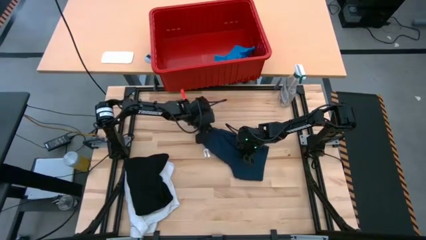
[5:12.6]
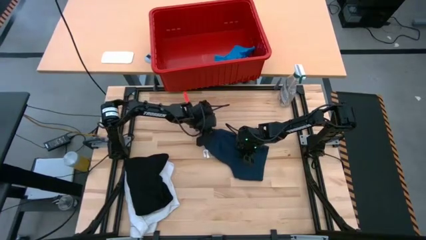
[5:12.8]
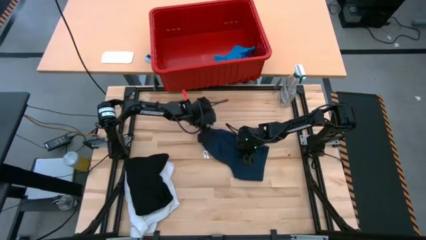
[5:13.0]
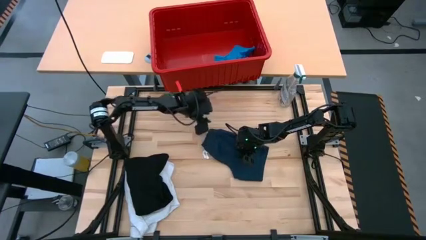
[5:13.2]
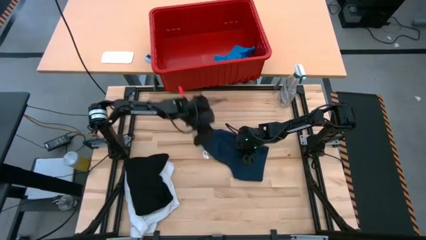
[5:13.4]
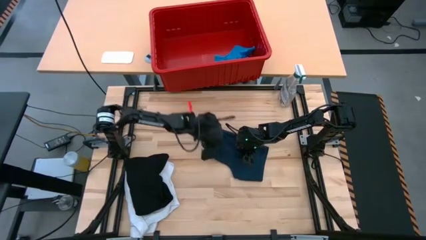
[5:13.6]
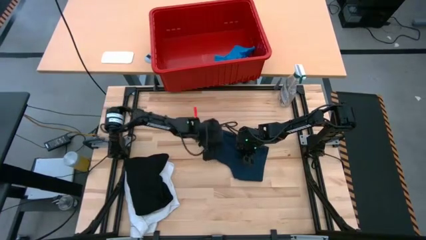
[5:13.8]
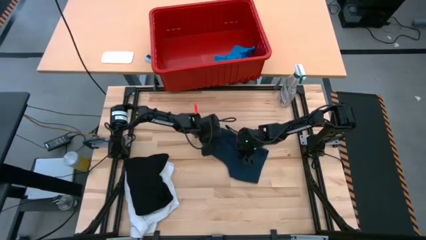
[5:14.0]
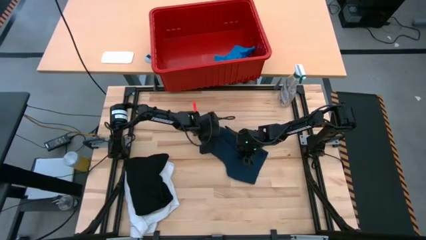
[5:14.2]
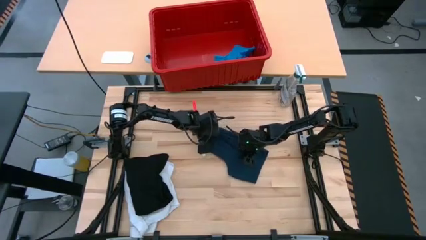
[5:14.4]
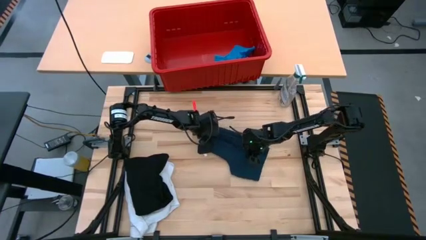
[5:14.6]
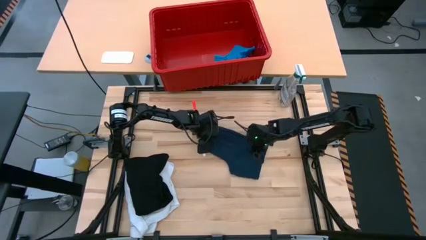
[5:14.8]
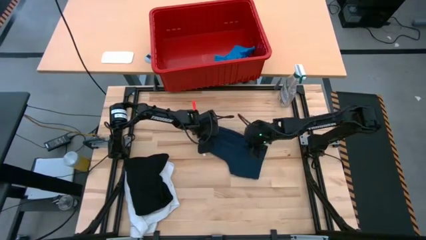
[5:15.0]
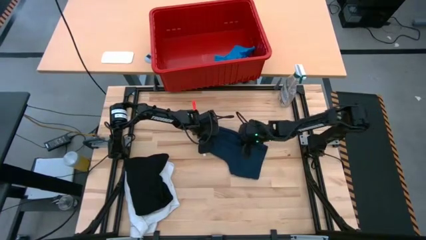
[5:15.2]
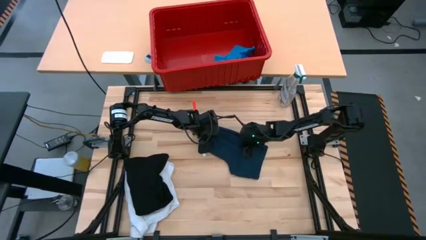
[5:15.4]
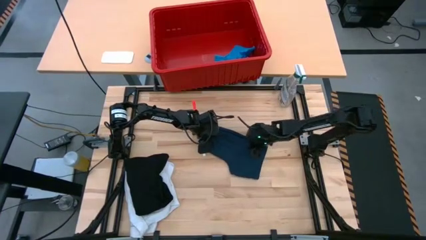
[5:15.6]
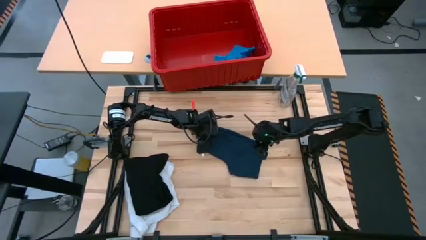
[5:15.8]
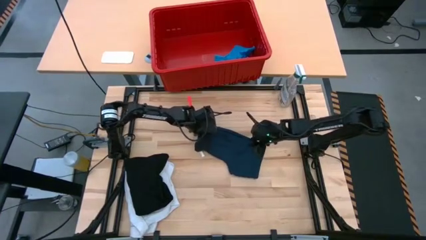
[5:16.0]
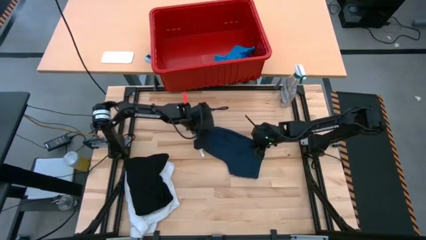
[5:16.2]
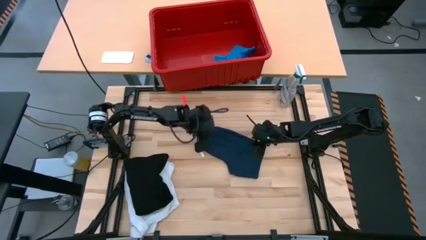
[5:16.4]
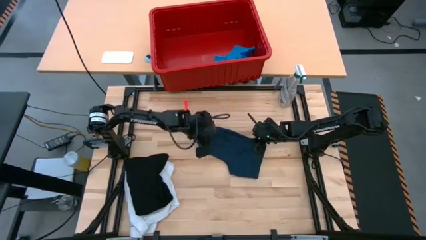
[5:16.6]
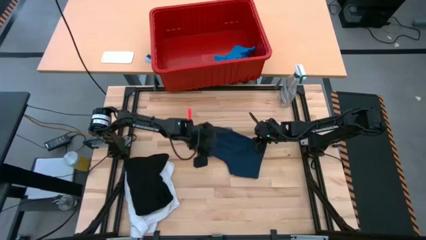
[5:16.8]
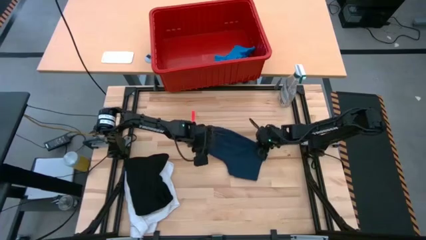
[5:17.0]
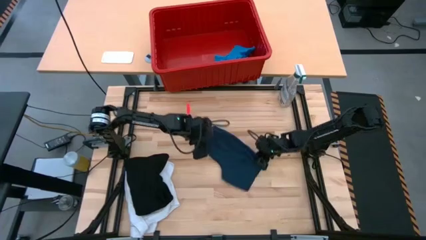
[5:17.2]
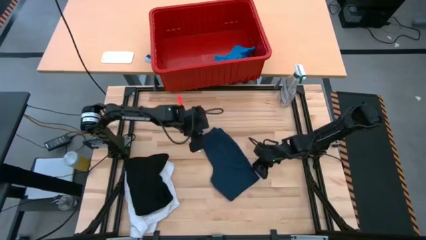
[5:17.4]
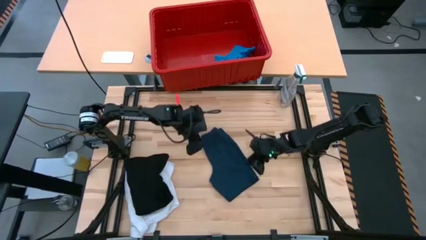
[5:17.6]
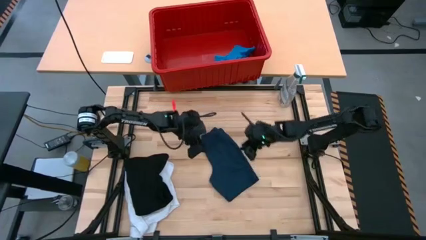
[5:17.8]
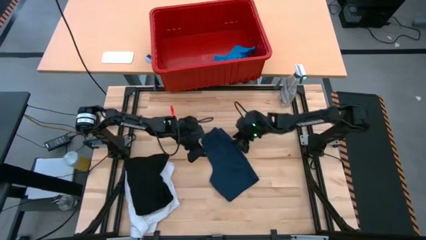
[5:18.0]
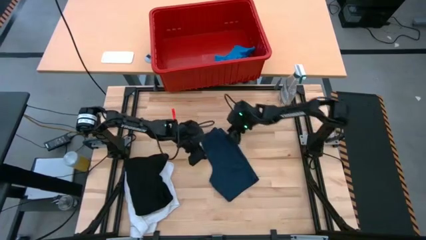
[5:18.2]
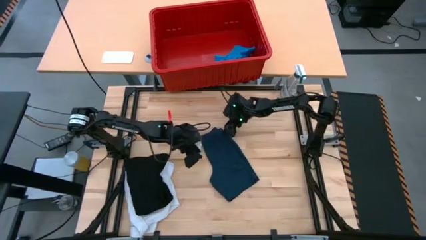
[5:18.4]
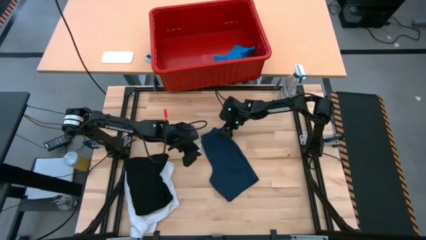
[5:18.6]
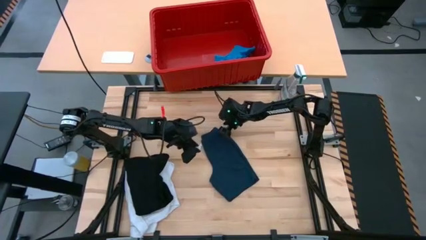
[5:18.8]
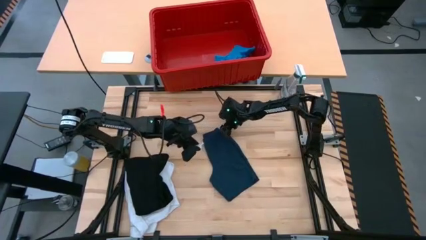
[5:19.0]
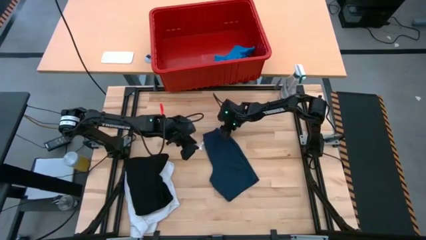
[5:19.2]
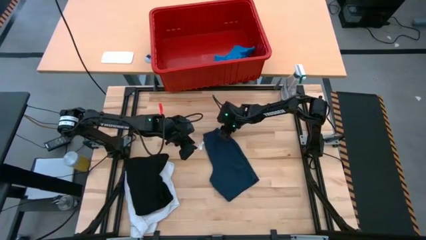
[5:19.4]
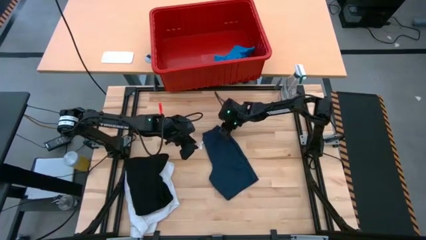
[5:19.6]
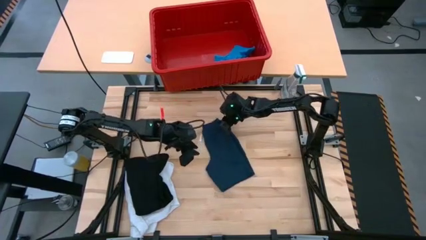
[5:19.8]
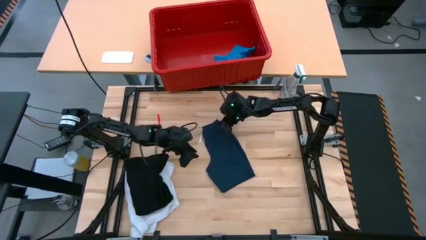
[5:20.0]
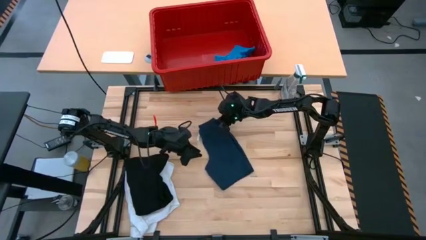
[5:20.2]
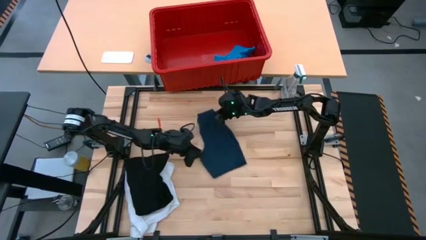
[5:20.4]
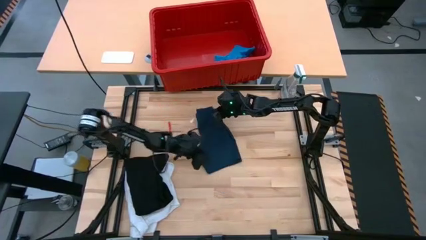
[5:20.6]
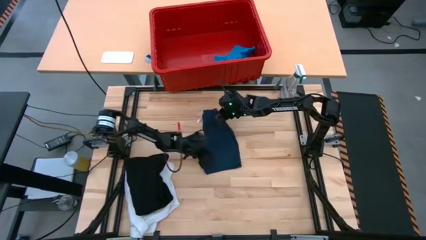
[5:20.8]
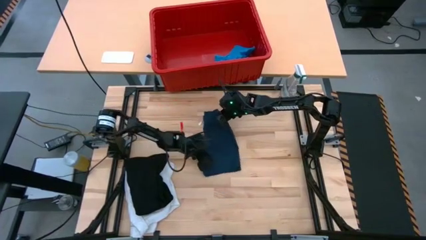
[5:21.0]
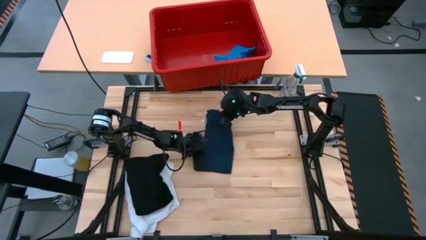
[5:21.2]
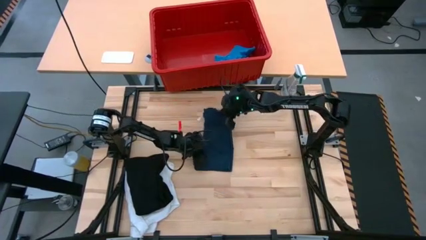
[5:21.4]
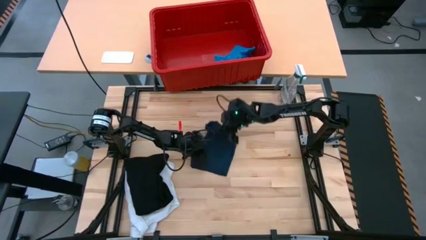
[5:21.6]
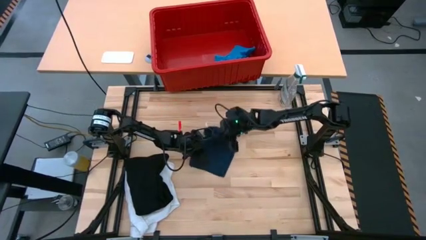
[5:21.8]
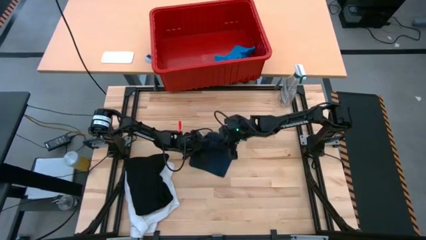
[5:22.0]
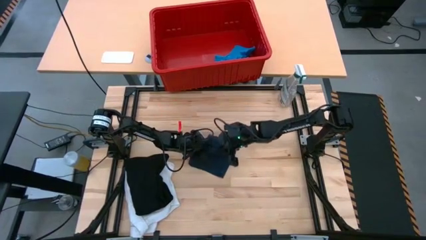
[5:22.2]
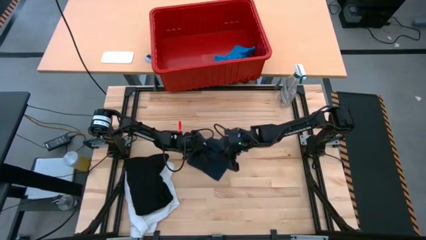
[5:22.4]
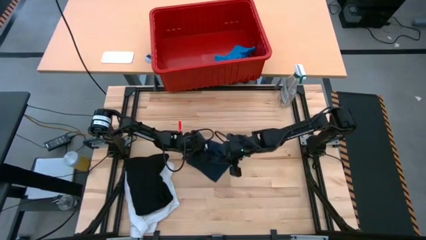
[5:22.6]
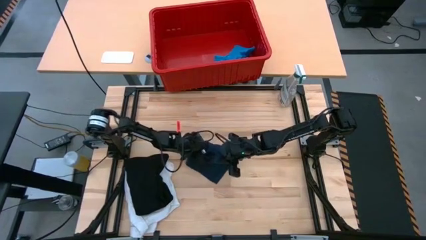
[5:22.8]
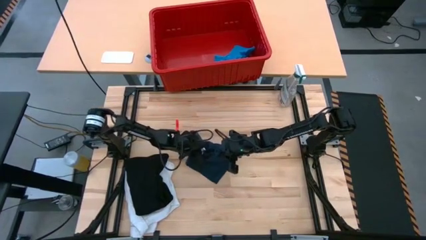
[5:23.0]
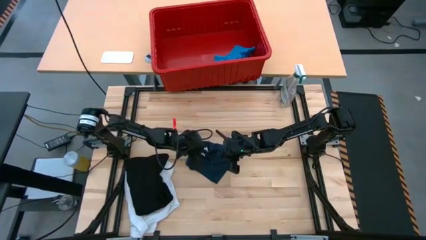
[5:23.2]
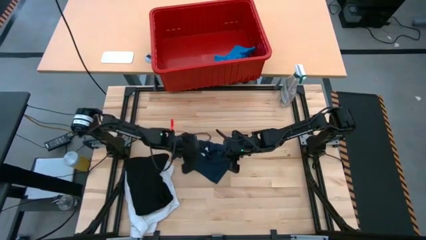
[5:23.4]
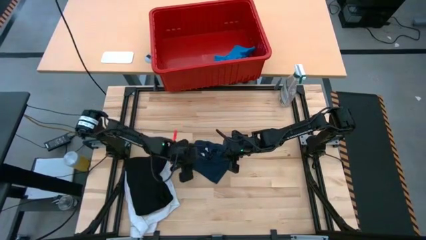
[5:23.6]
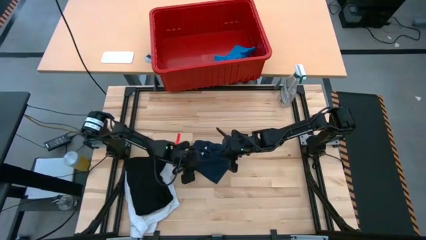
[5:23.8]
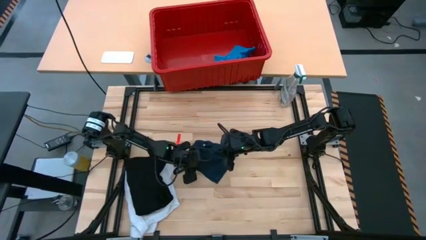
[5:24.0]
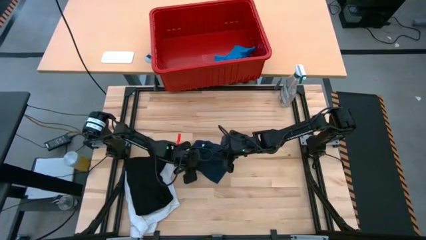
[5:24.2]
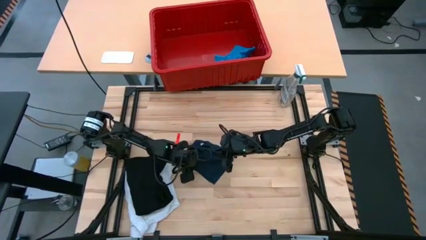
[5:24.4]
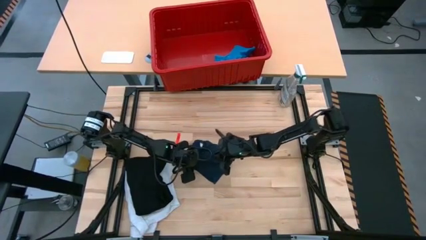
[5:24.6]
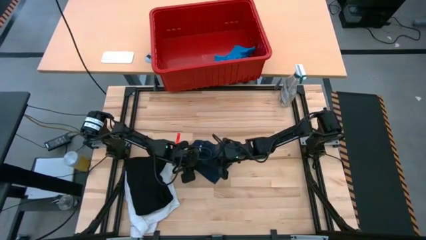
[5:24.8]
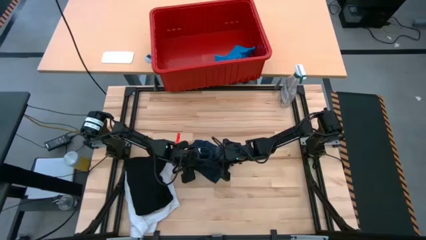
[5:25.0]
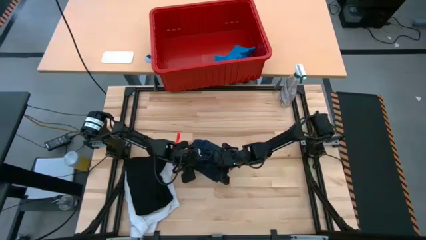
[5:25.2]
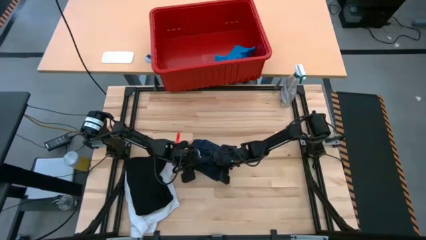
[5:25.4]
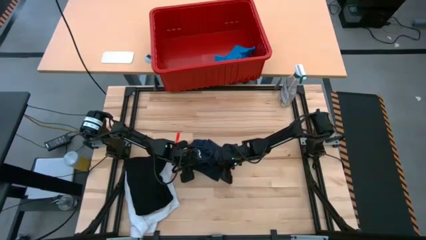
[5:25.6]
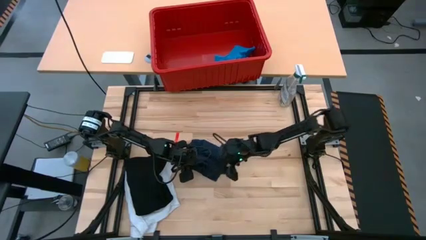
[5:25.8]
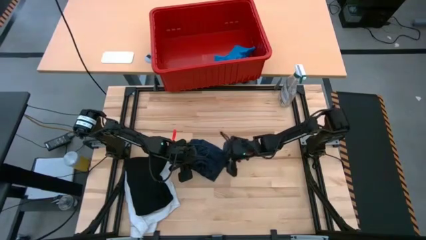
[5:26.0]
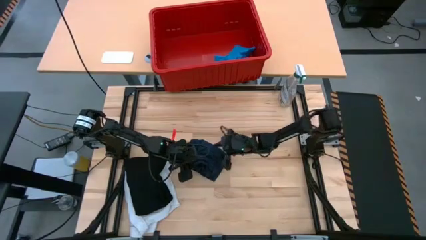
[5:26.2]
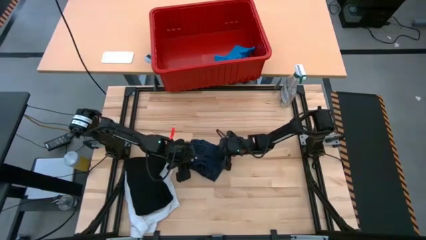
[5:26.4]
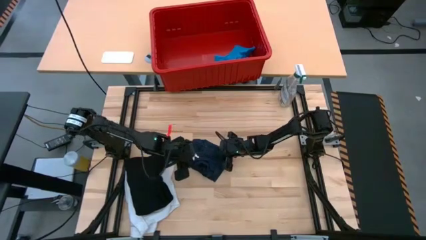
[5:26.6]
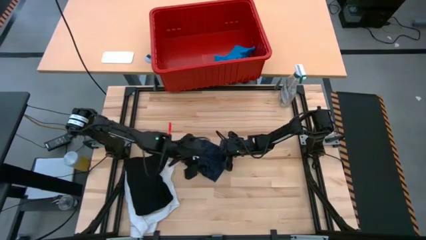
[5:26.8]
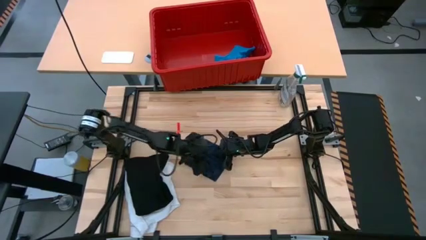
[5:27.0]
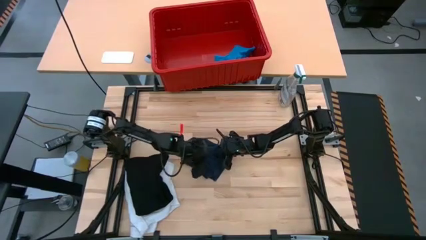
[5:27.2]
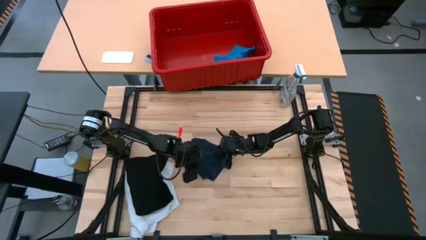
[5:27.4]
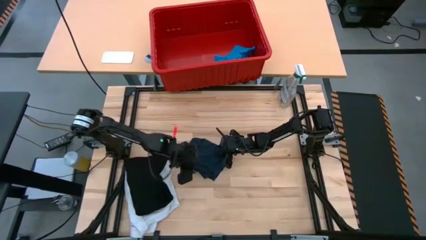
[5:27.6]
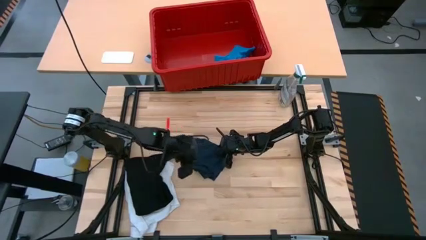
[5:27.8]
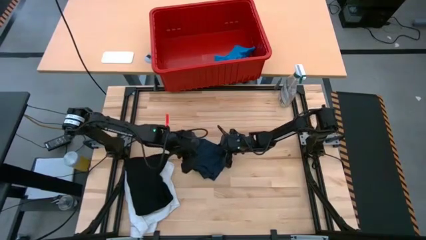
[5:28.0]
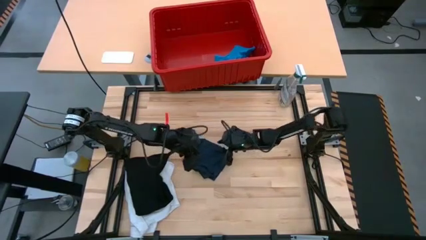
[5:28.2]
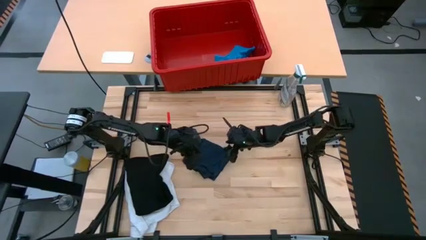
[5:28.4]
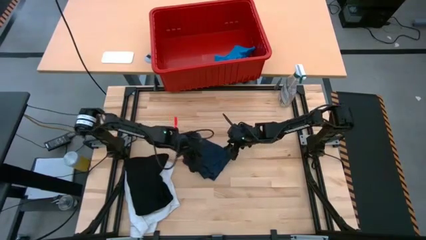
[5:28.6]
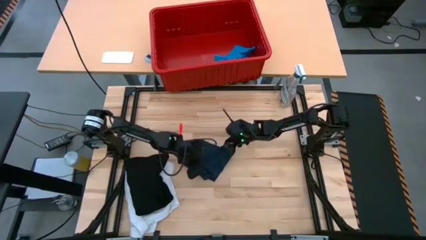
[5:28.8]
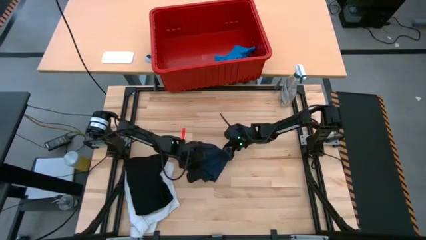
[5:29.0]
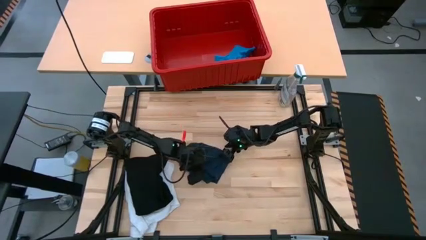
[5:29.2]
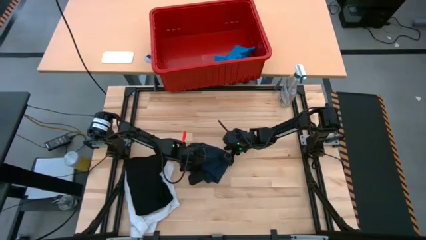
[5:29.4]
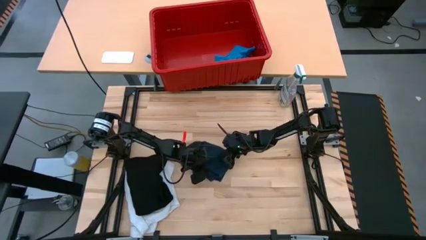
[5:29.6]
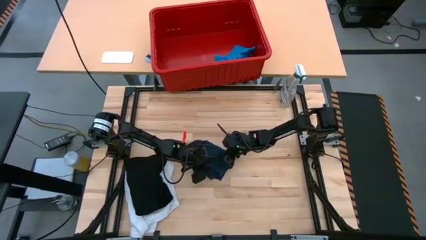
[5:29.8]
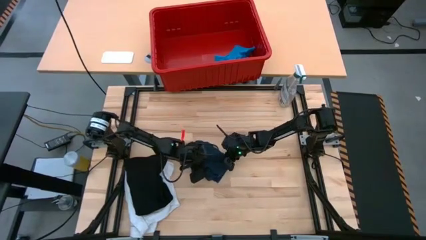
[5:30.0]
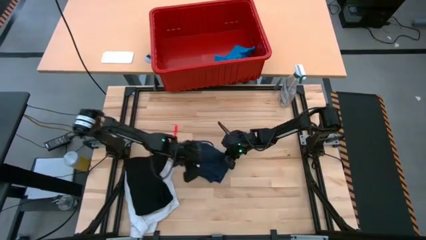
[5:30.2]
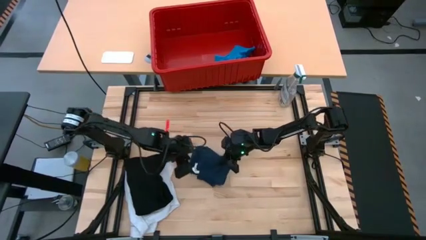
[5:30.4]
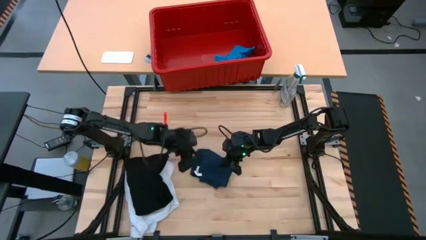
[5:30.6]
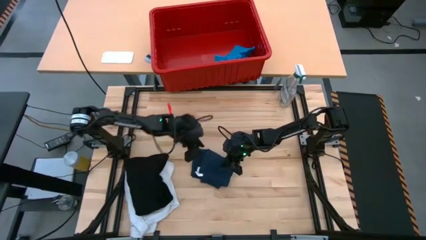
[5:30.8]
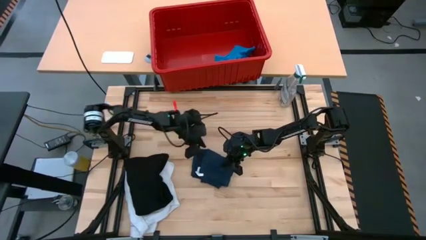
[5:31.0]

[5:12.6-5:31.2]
Task: Fold Laundry from Bin
Fold the dark blue shorts
